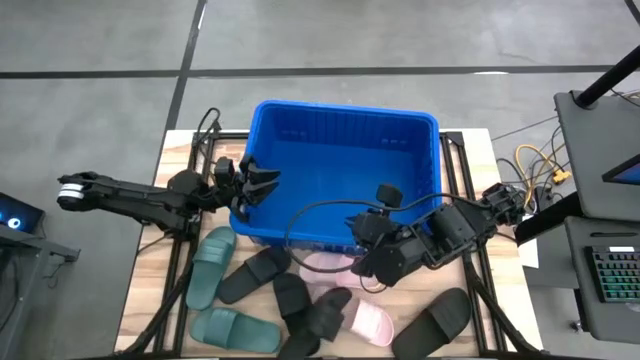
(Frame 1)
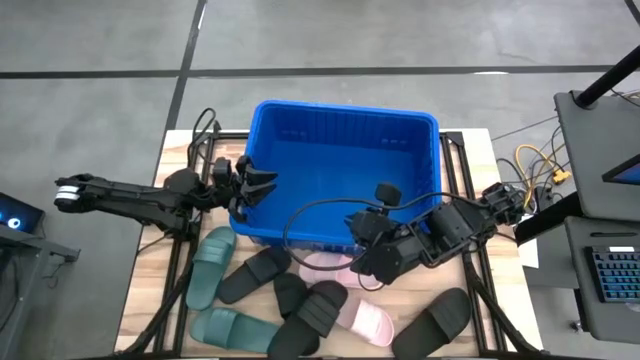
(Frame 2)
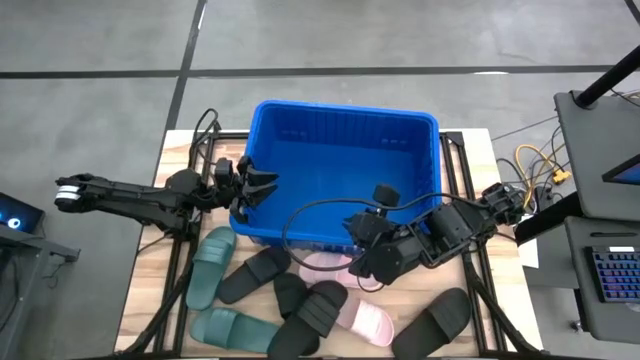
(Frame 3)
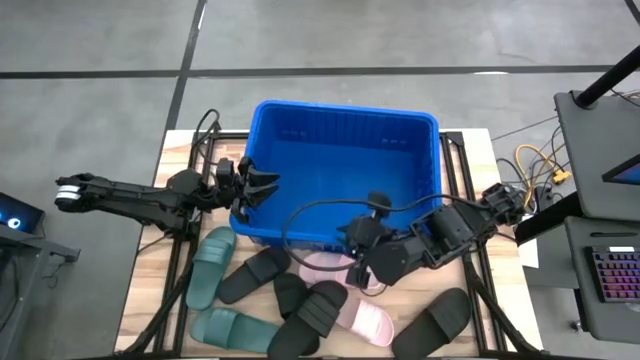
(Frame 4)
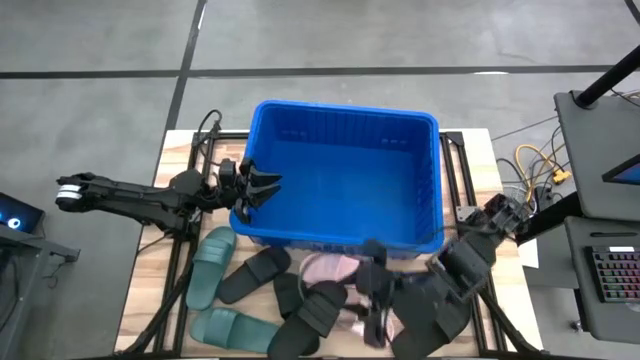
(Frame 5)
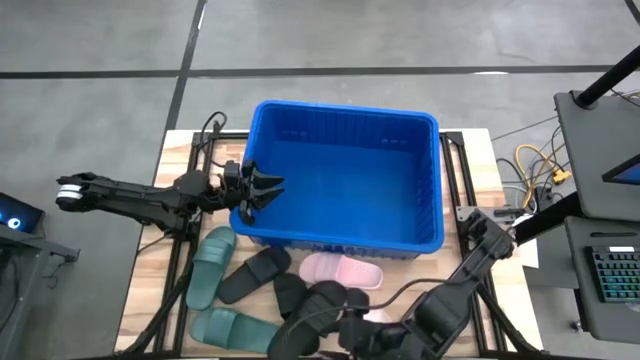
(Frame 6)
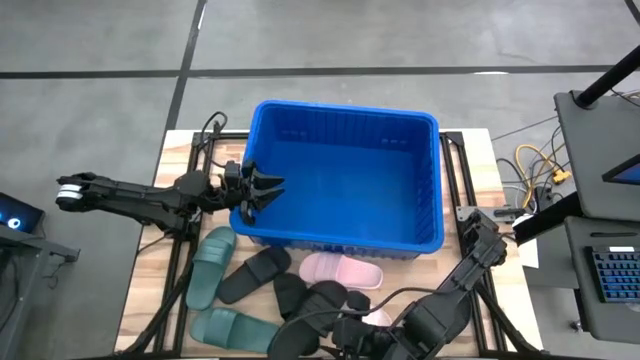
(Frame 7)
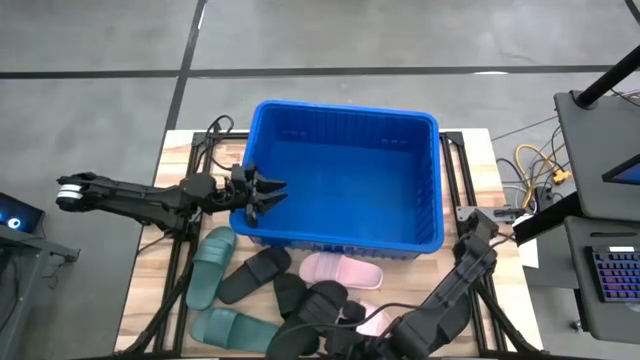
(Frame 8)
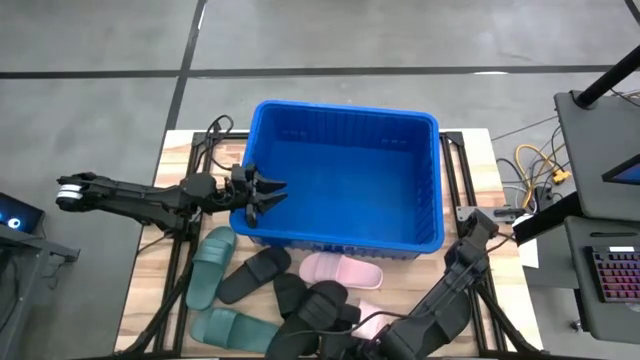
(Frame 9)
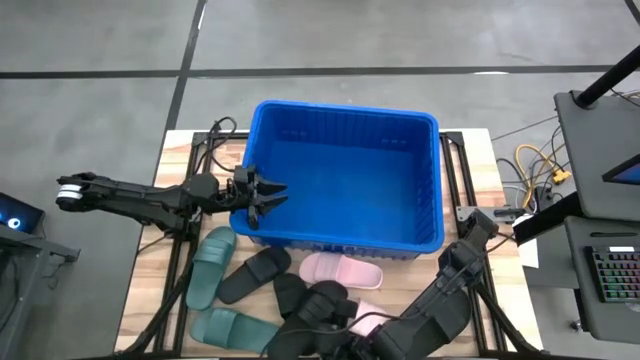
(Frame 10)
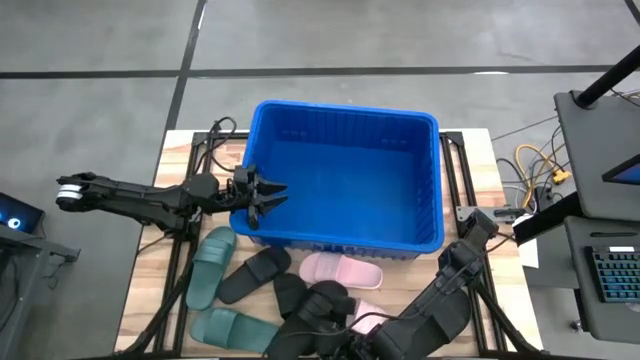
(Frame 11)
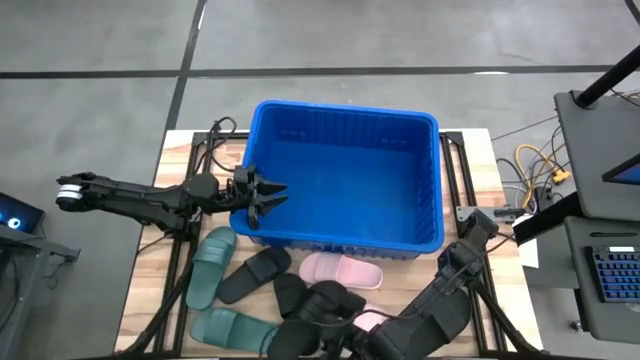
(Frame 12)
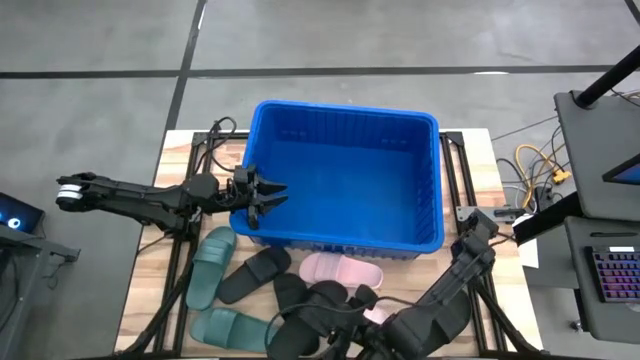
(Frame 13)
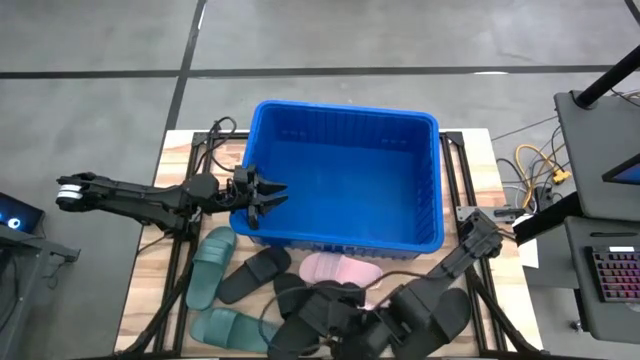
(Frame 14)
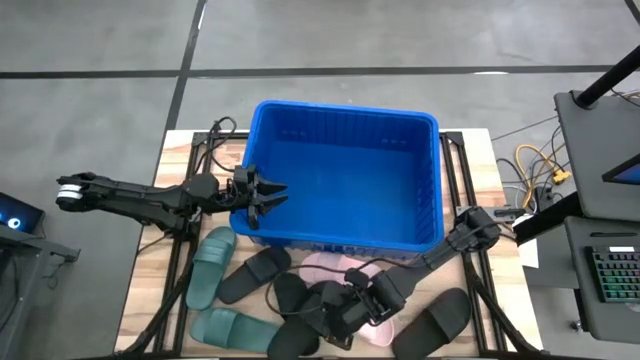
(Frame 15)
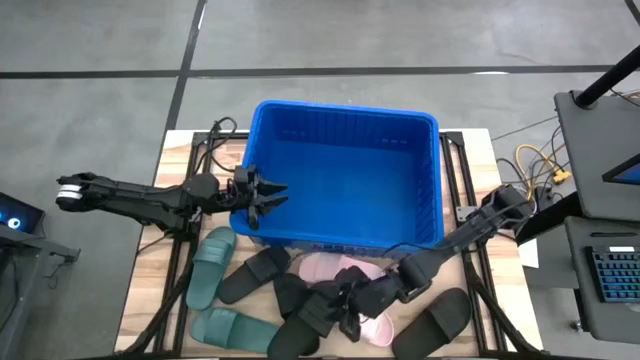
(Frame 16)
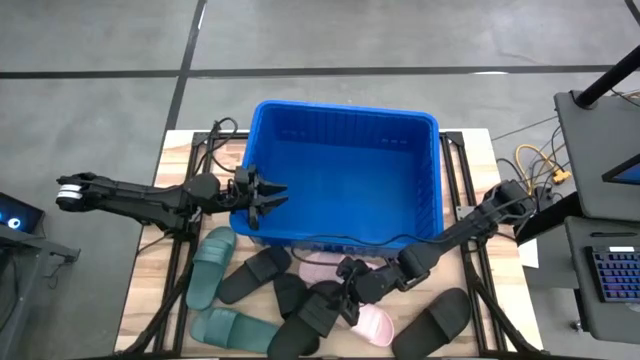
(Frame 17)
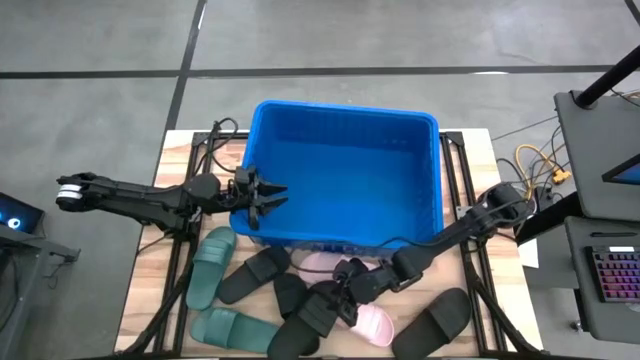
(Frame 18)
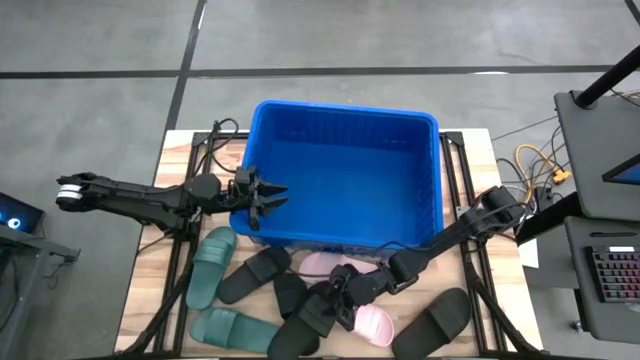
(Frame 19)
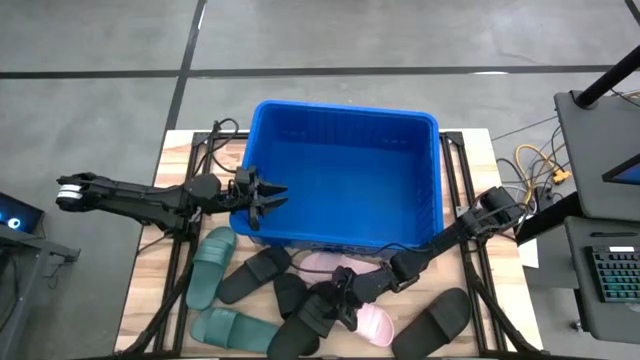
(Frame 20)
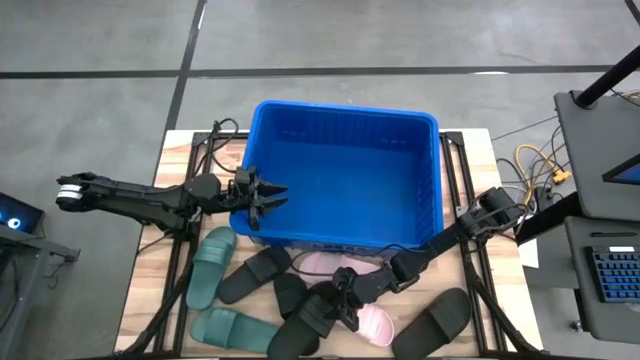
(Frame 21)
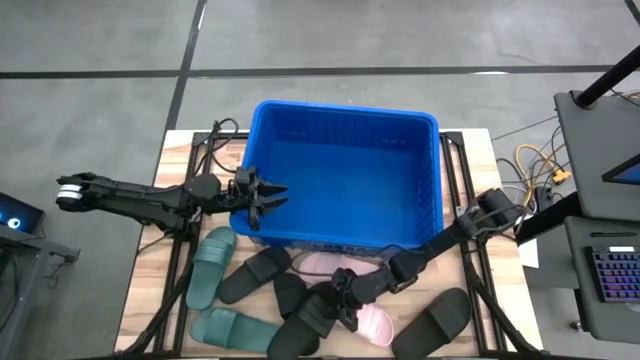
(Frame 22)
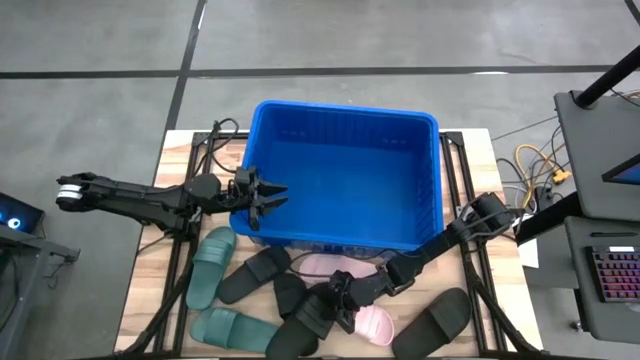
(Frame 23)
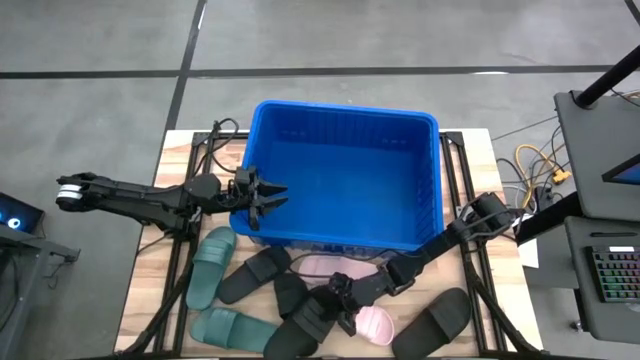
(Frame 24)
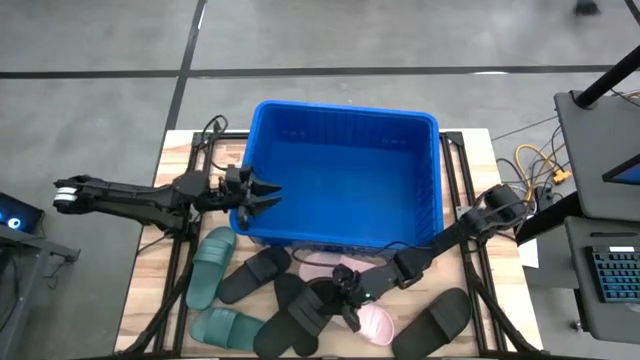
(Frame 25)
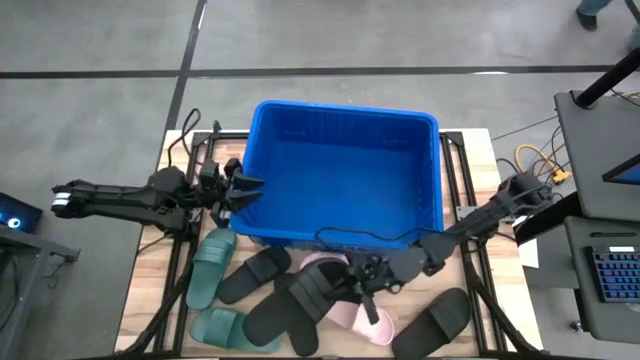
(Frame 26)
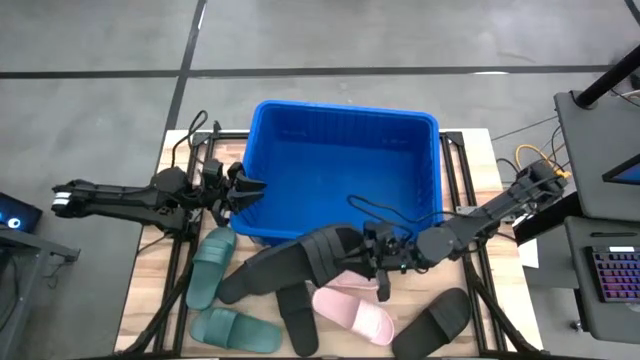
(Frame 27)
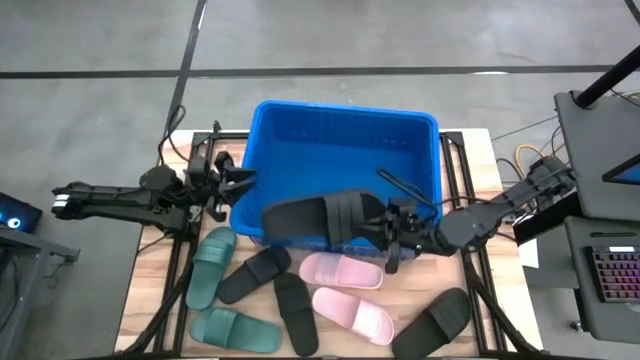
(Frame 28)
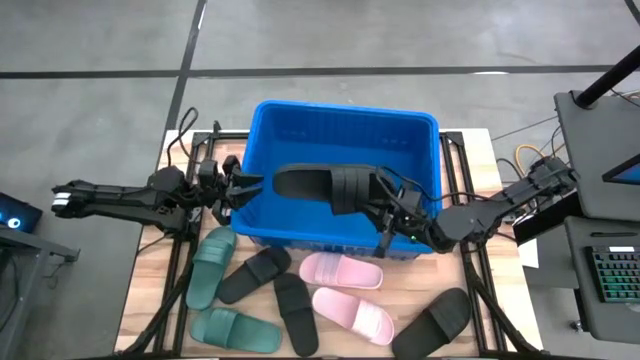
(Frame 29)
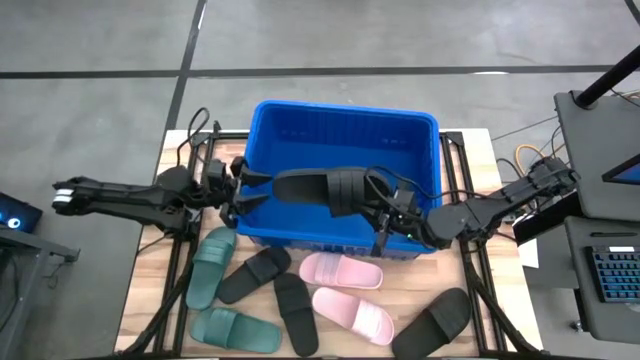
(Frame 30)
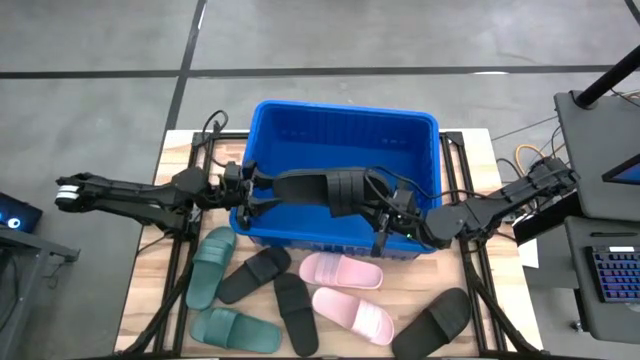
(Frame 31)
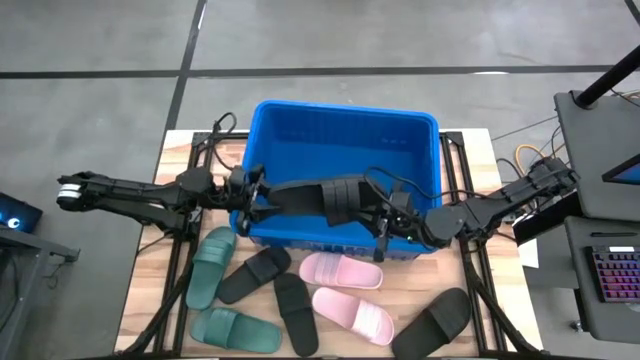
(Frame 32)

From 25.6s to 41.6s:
Task: Pick and place slides into bin
Put the top right black slide into the blue bin
